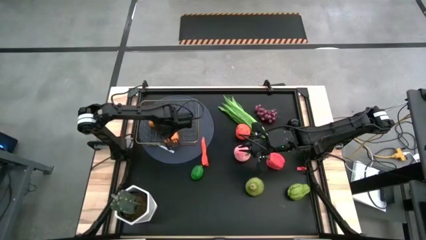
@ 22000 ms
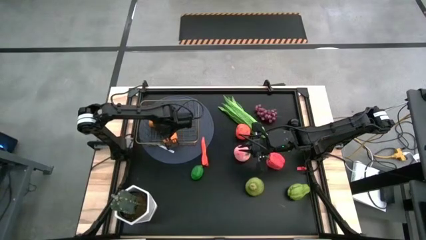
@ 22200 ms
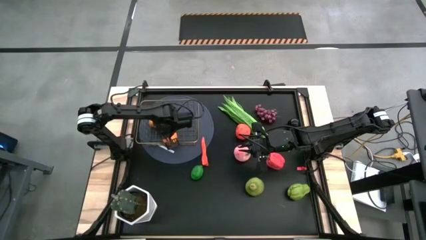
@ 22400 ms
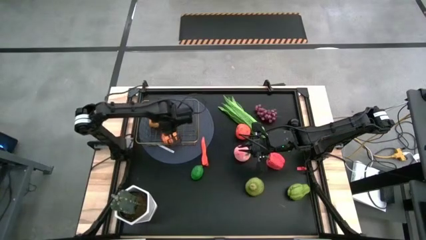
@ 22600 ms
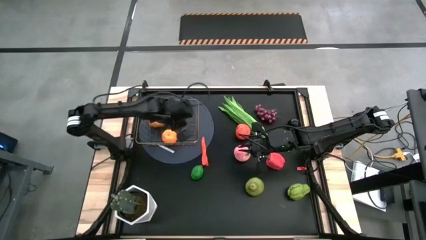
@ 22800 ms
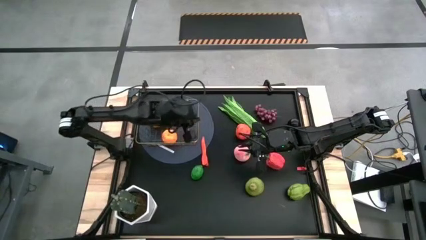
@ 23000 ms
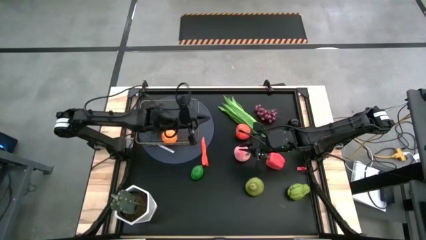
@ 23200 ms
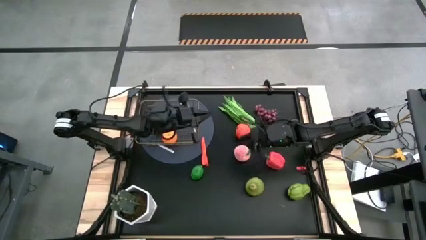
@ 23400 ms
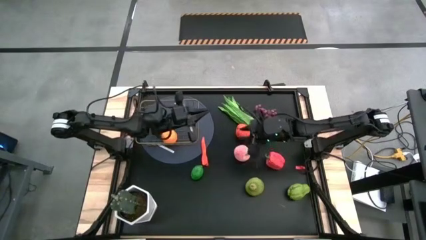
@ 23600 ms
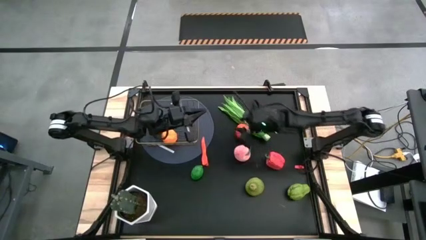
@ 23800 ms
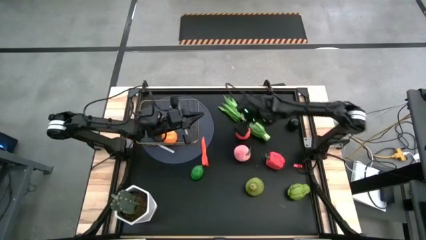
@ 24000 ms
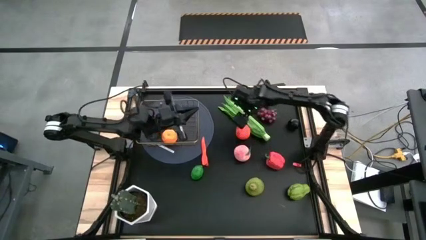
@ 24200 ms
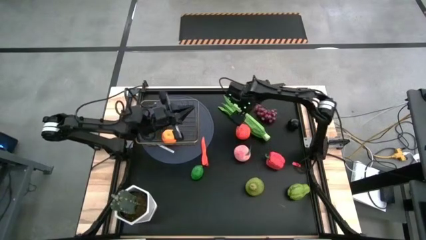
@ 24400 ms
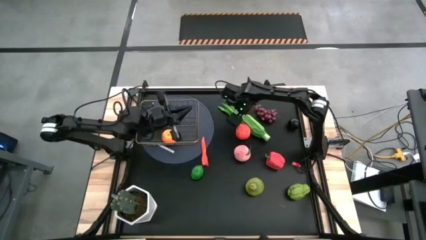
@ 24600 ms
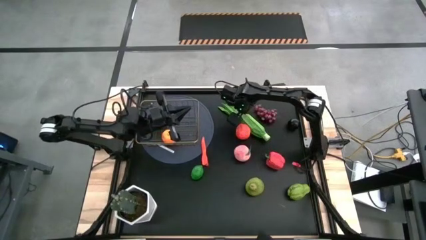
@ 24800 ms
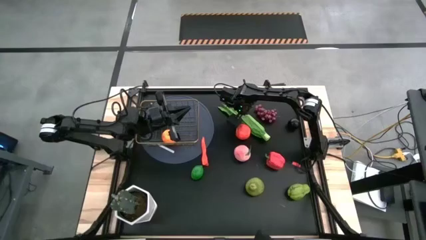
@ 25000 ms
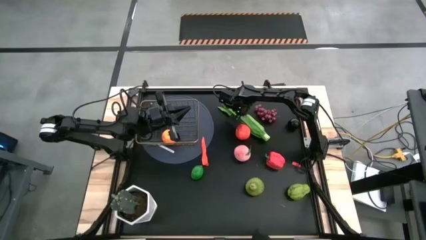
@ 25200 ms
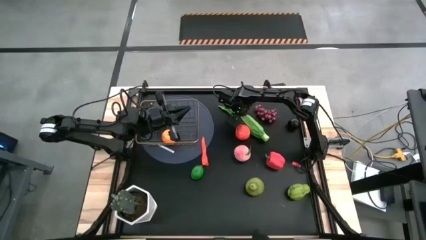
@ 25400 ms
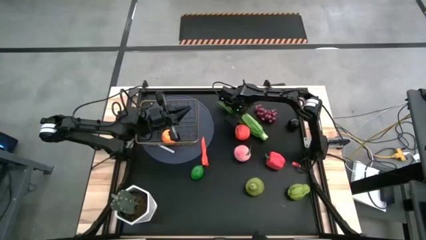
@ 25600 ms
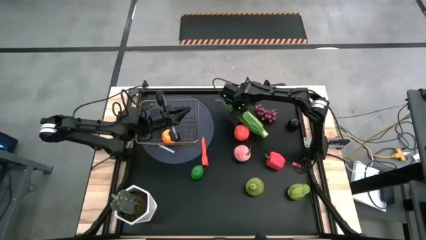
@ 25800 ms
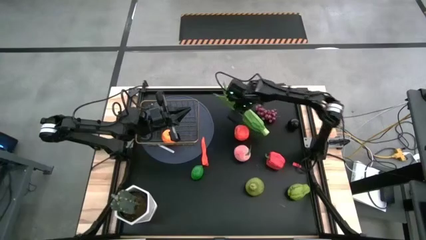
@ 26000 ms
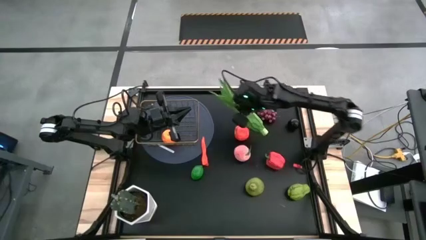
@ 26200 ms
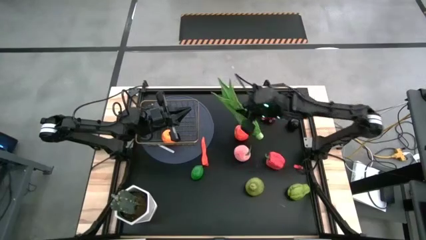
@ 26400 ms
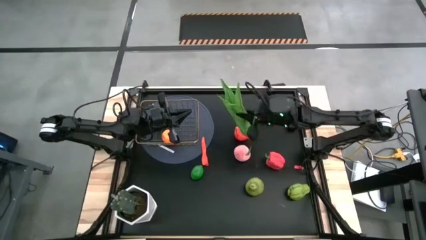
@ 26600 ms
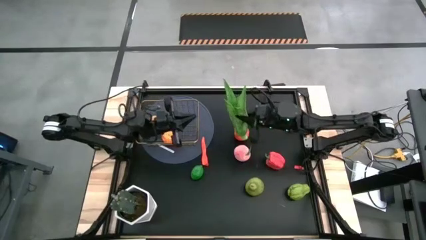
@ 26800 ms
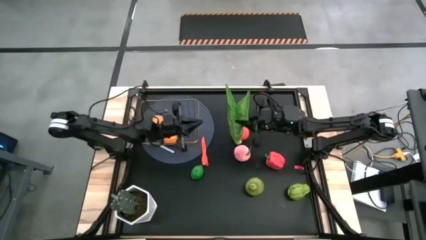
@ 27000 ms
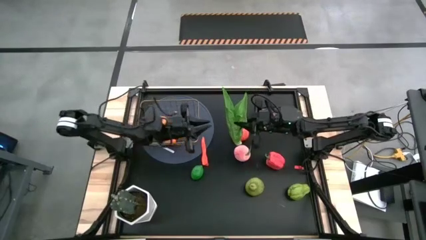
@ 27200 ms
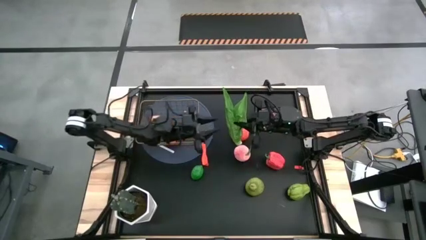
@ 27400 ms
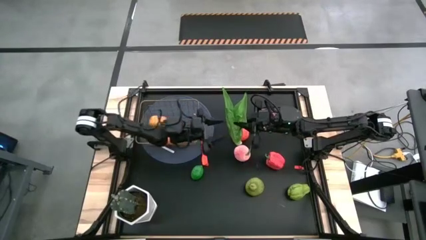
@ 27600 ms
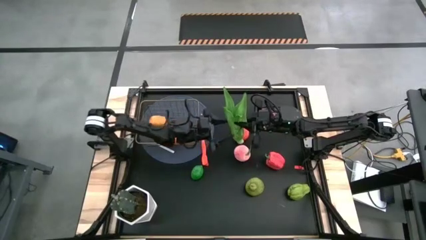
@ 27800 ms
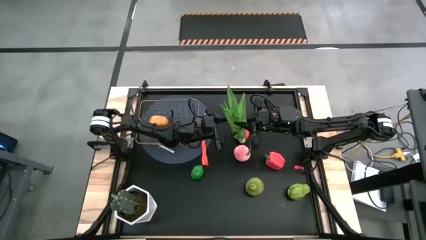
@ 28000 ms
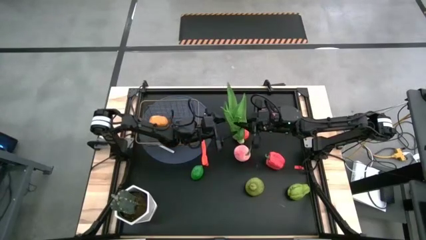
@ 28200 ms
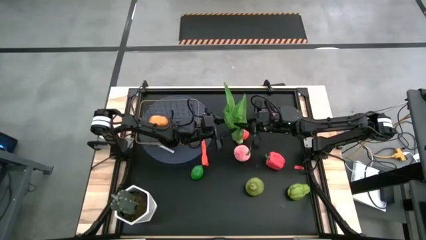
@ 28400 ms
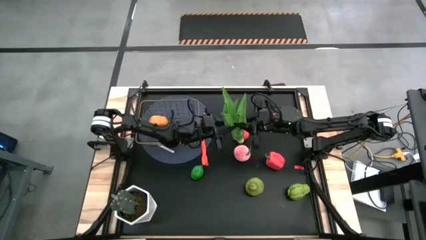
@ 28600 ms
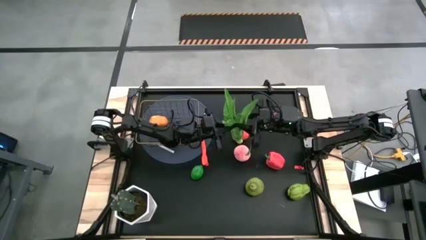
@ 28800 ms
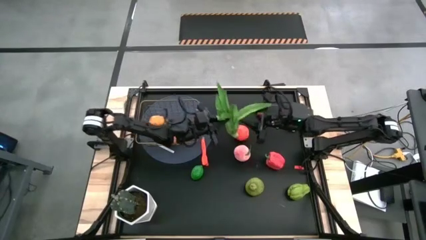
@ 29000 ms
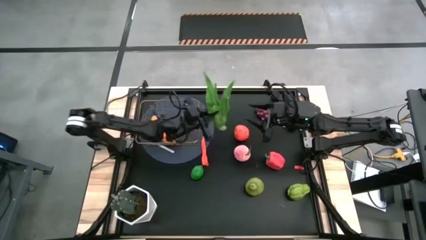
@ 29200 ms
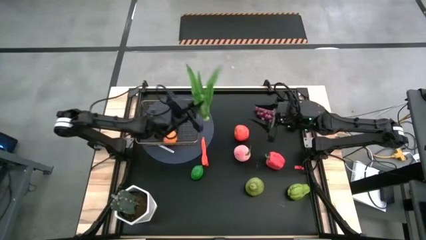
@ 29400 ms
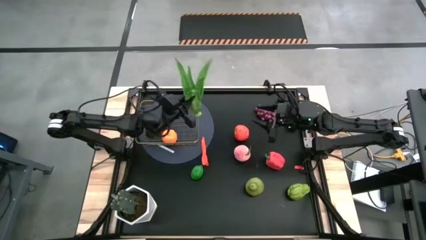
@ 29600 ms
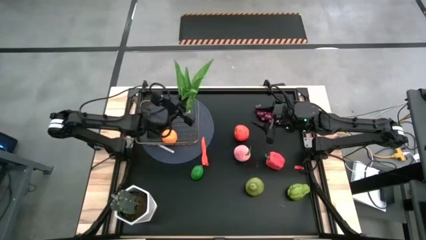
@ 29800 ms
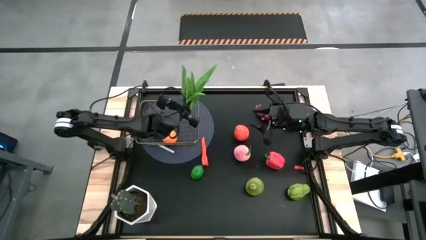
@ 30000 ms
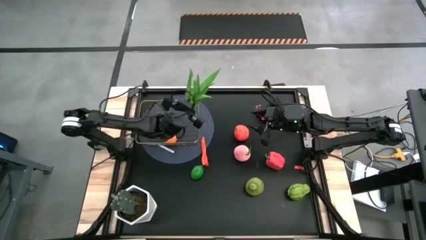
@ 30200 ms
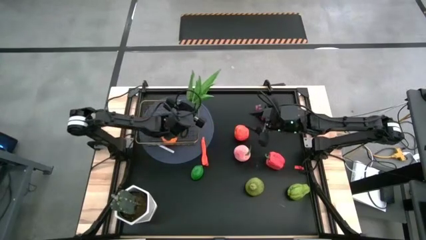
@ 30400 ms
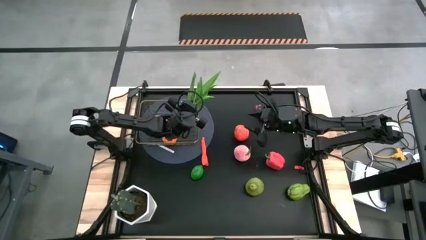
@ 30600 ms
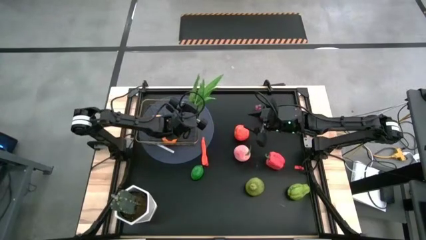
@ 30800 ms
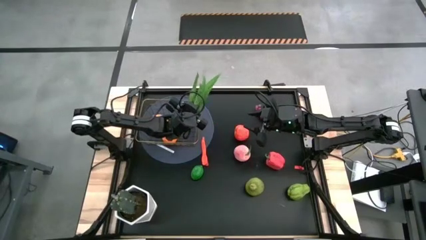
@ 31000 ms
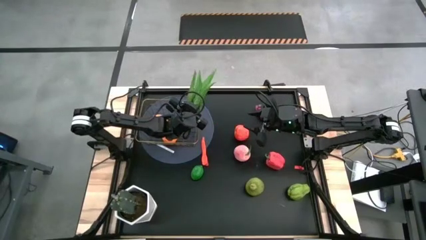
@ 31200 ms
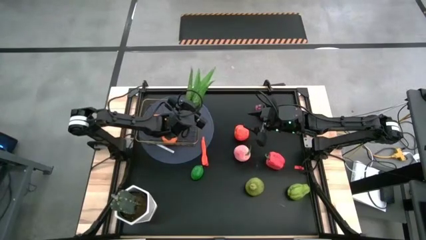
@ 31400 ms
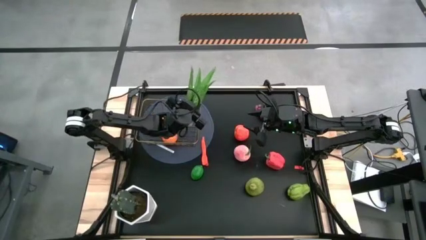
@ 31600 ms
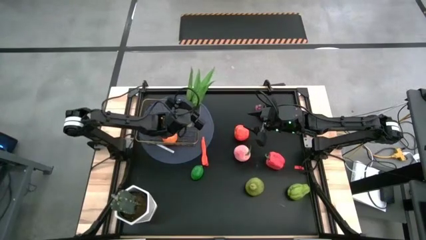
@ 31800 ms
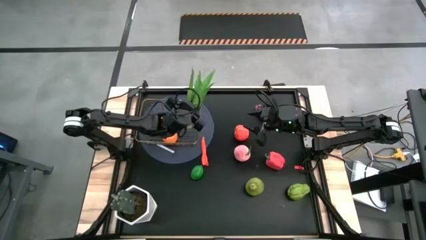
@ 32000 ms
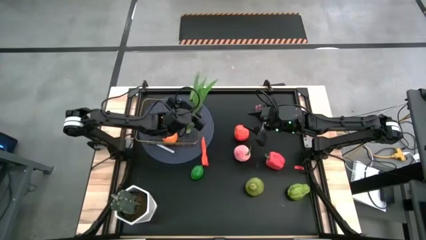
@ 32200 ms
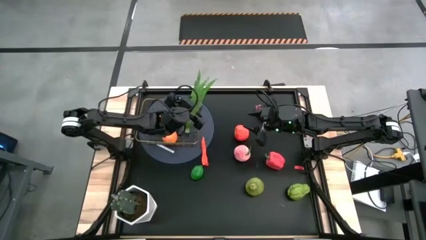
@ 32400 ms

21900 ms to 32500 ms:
Task: Build produce basket
Put the green leaf lettuce into the wire basket

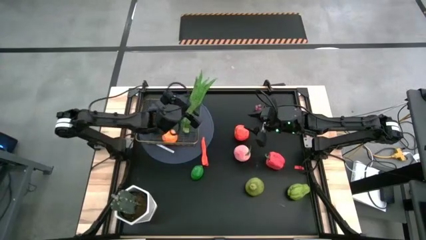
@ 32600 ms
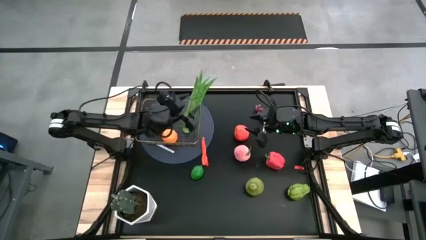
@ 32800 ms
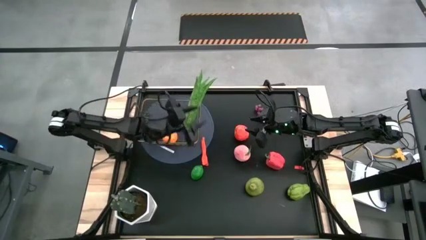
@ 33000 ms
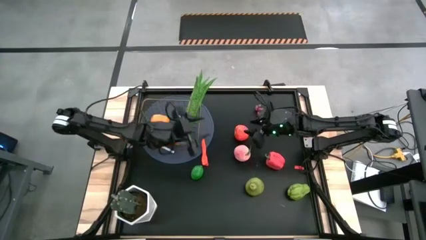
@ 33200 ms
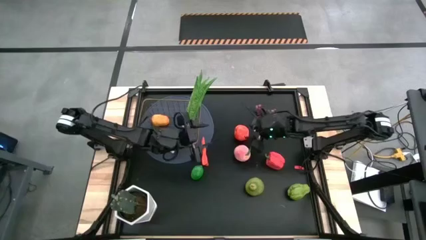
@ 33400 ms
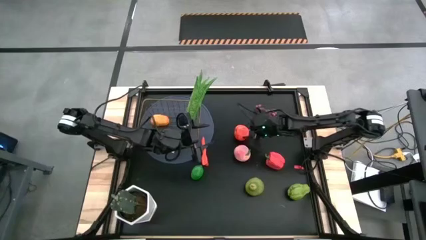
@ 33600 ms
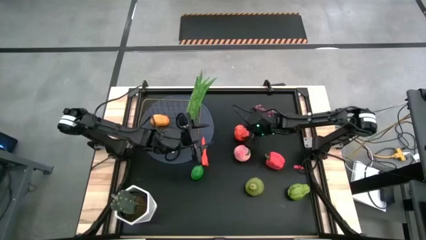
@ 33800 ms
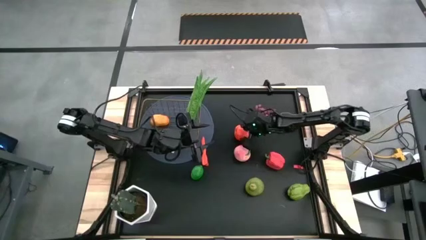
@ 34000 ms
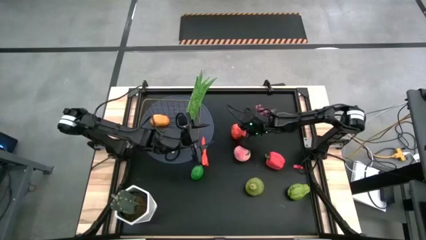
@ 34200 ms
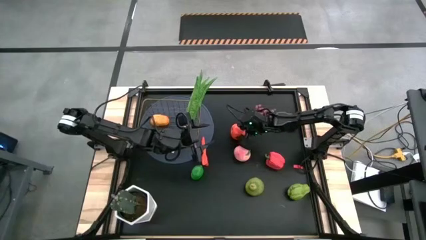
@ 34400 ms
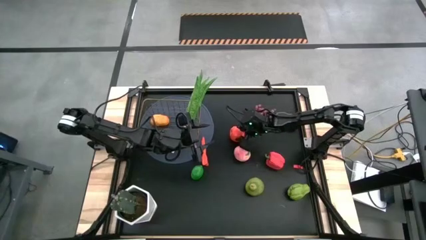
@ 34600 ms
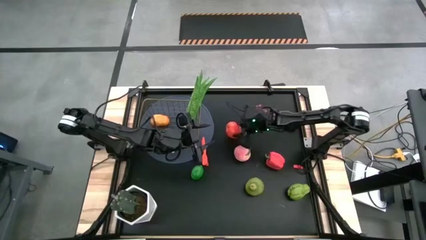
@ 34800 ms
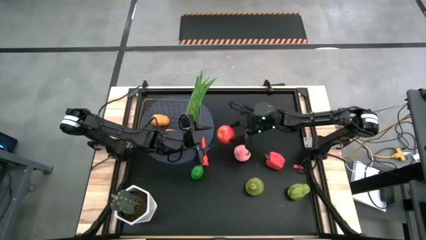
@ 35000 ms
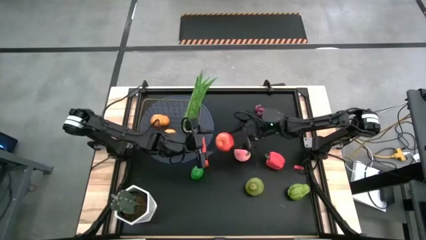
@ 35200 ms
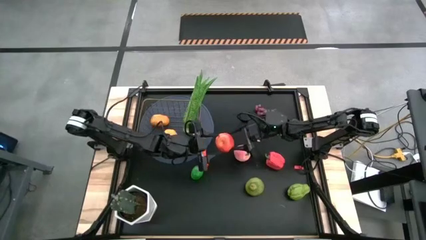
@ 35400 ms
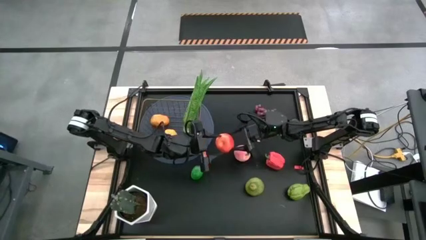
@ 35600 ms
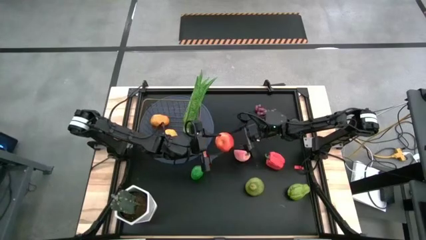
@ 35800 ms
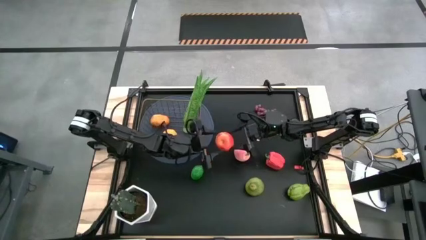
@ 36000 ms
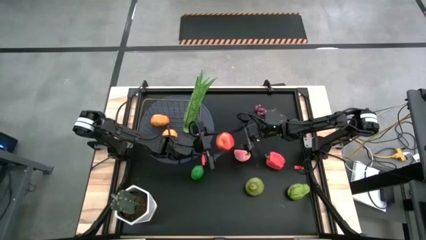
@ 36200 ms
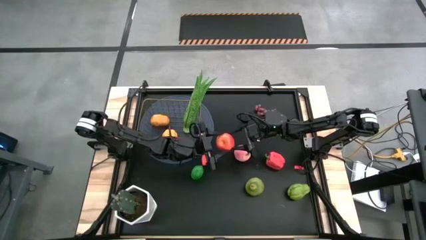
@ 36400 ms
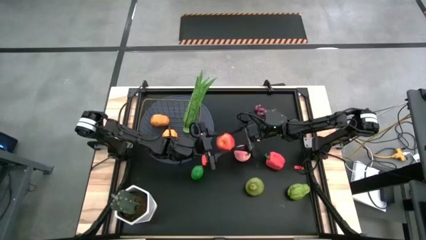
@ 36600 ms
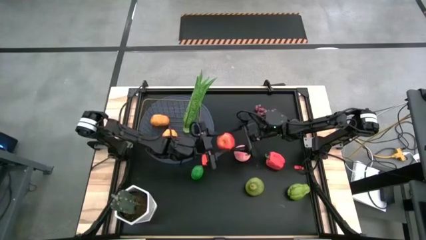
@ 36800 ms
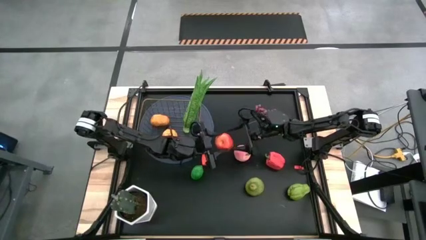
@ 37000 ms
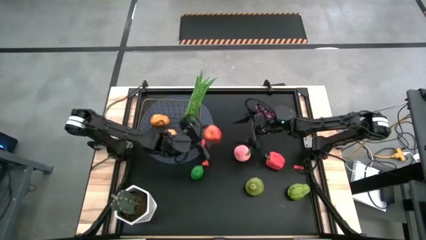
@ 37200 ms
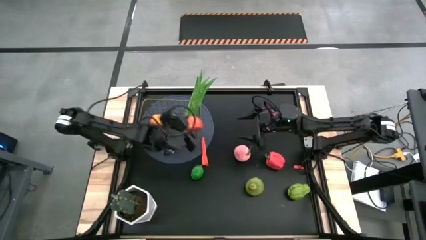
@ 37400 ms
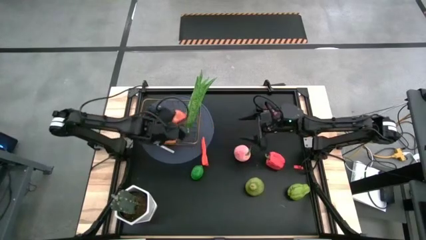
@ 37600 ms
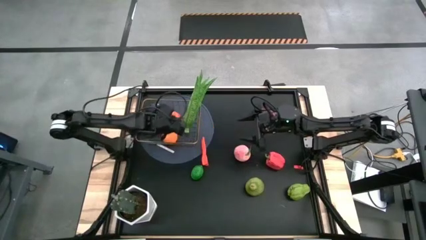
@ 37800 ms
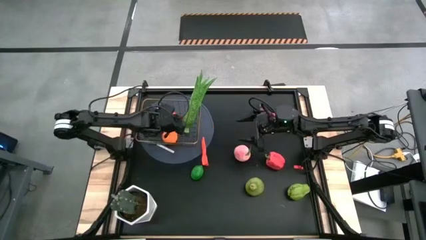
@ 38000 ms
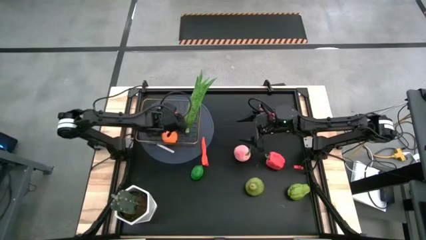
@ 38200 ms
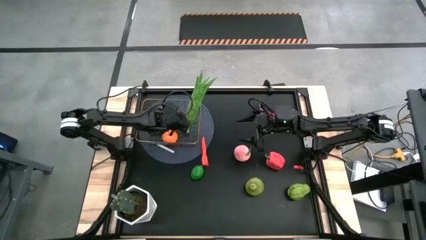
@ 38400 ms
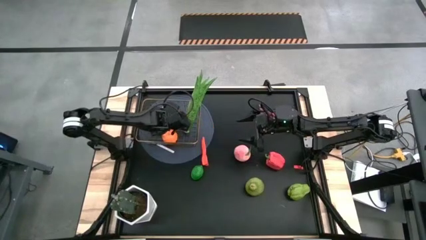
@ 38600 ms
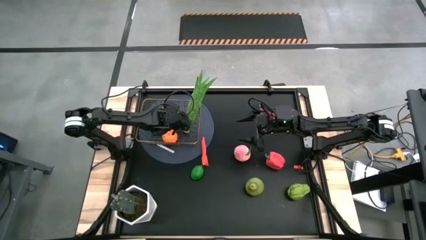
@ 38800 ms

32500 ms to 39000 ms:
Put the red apple into the wire basket
